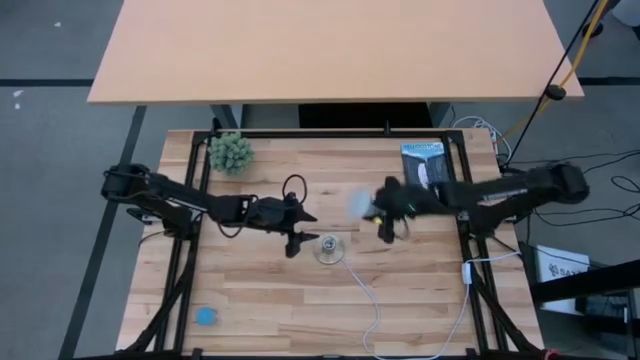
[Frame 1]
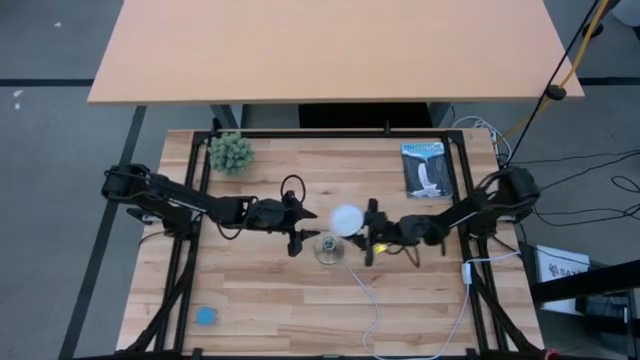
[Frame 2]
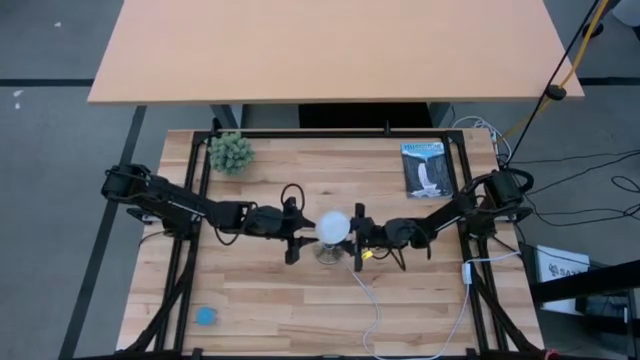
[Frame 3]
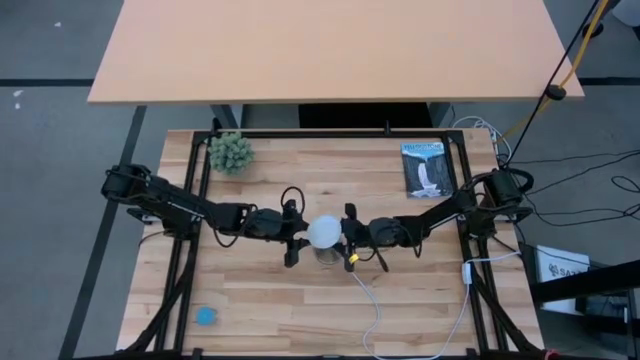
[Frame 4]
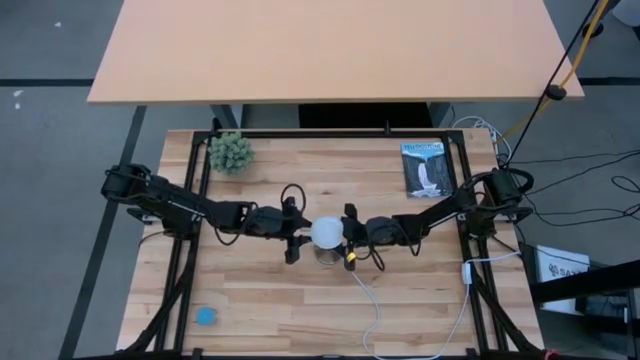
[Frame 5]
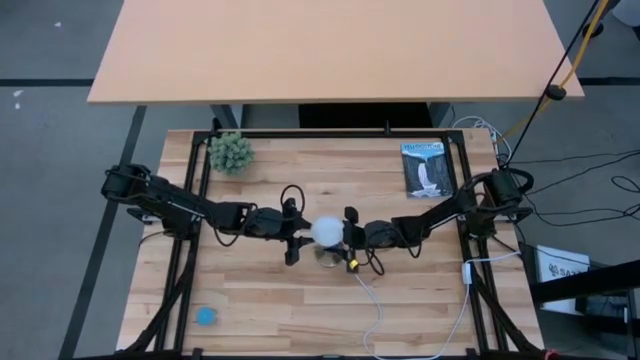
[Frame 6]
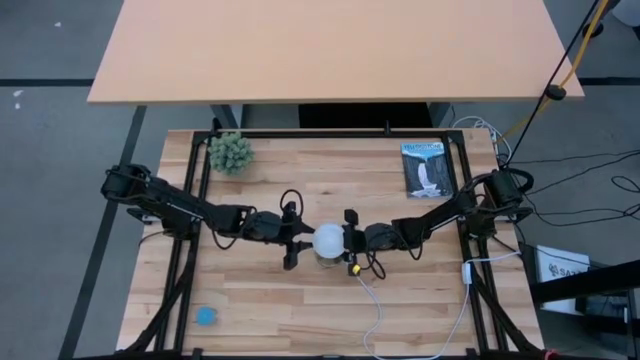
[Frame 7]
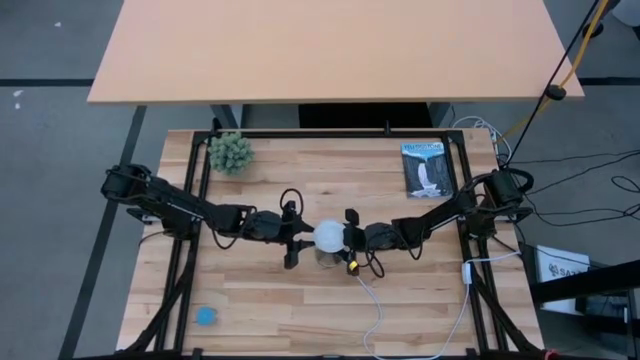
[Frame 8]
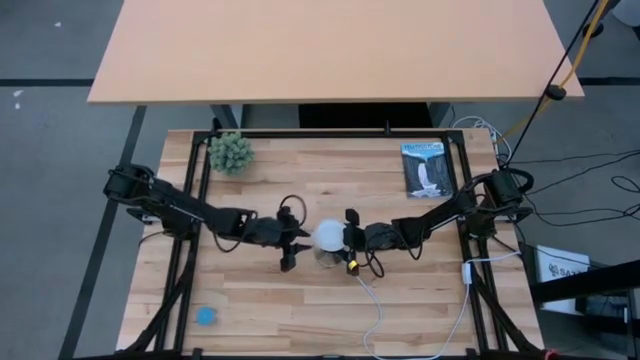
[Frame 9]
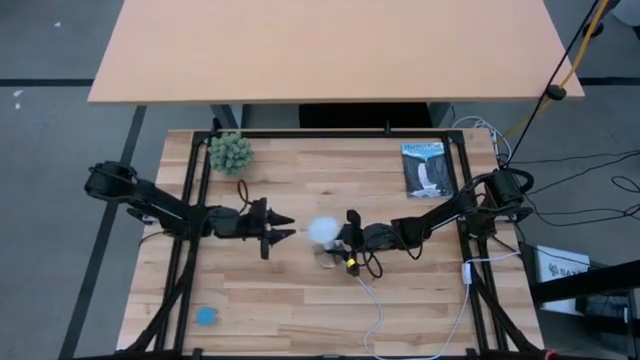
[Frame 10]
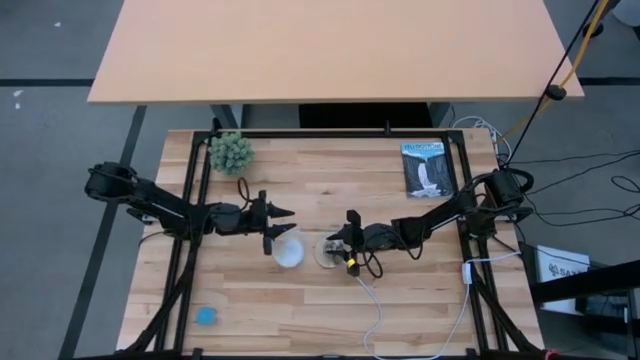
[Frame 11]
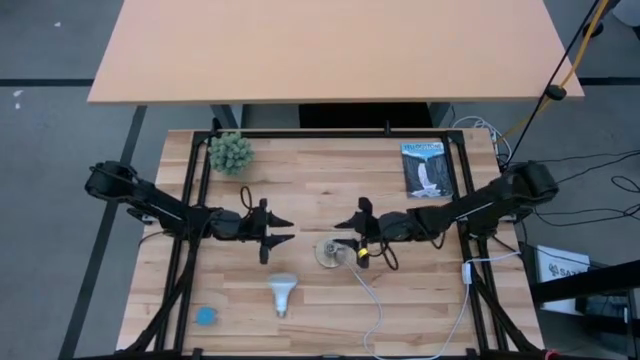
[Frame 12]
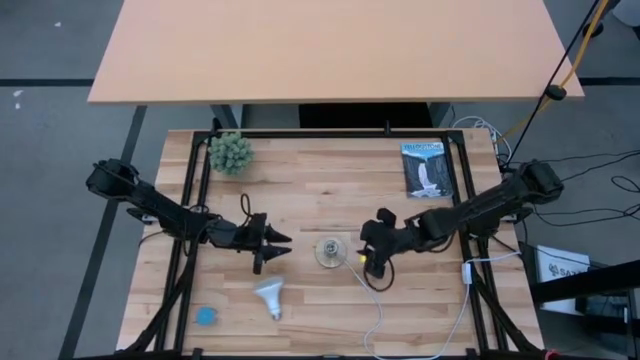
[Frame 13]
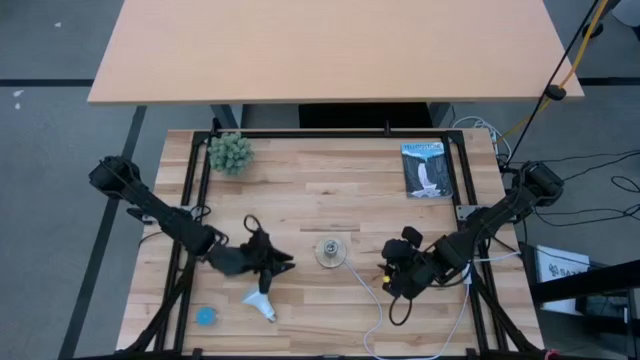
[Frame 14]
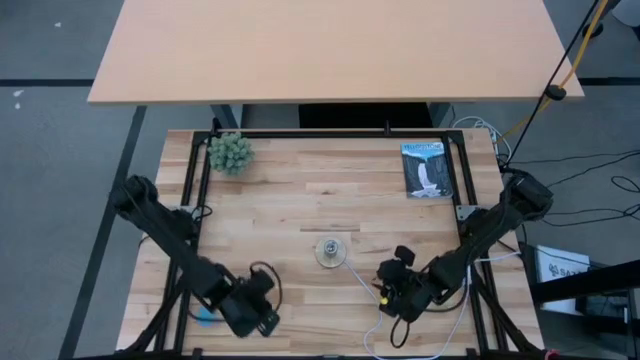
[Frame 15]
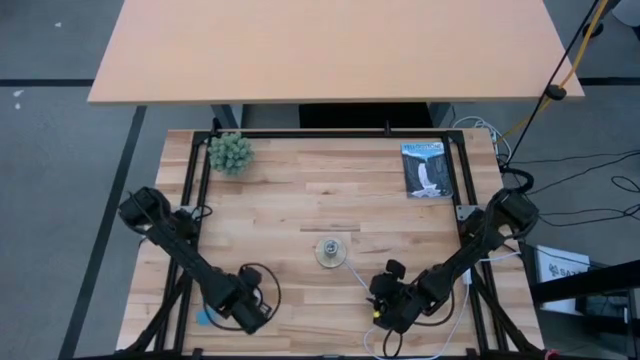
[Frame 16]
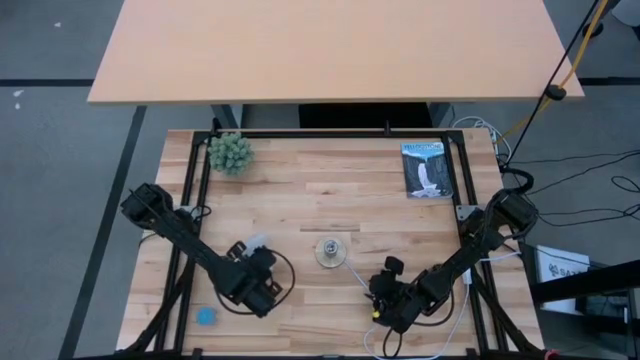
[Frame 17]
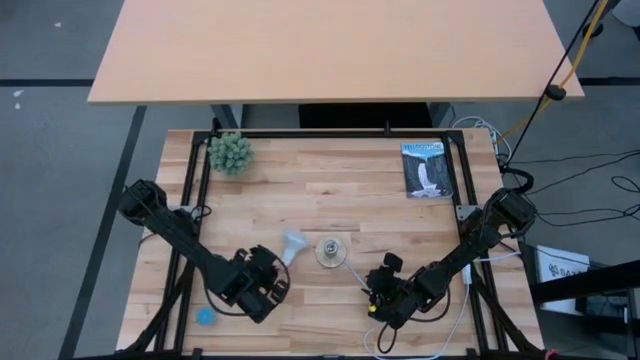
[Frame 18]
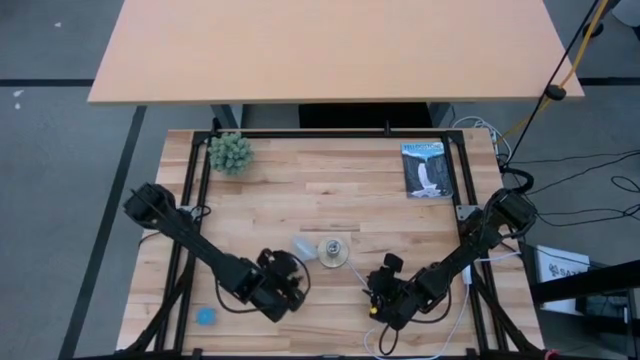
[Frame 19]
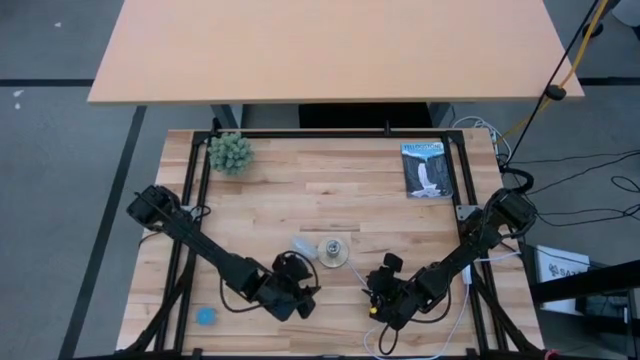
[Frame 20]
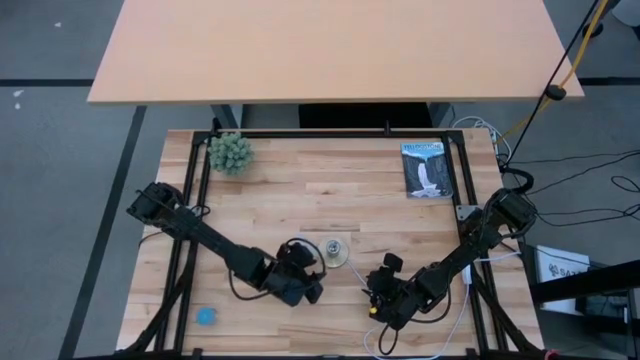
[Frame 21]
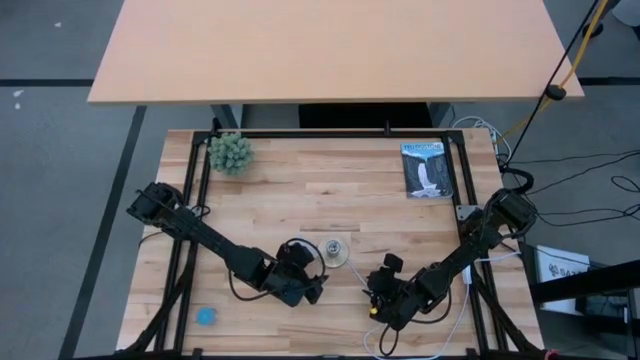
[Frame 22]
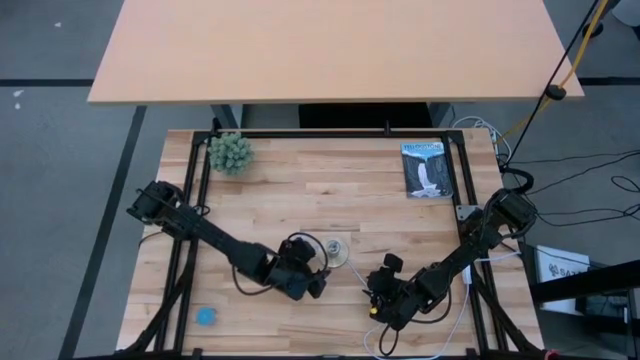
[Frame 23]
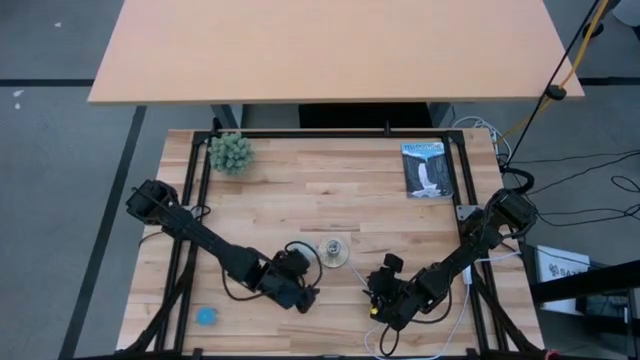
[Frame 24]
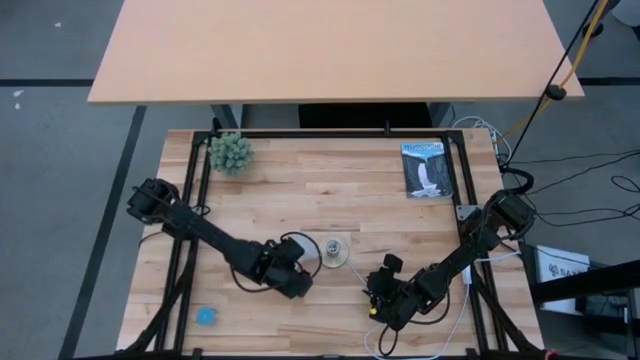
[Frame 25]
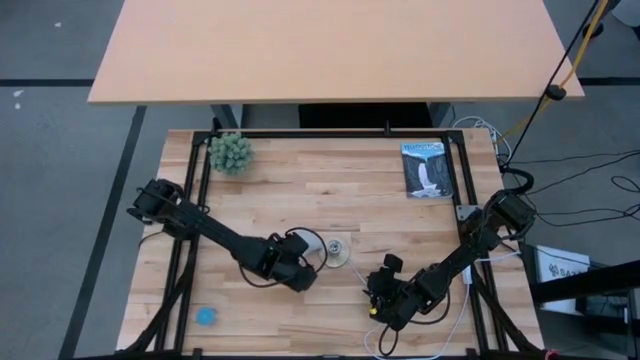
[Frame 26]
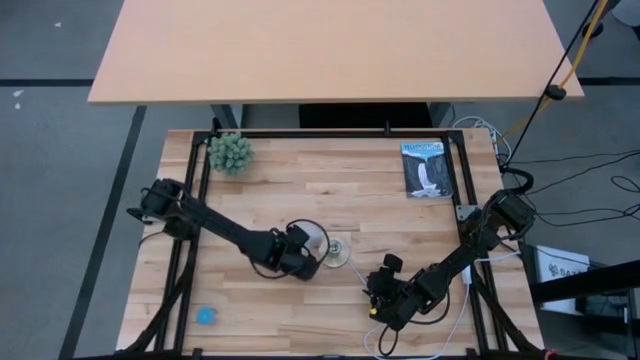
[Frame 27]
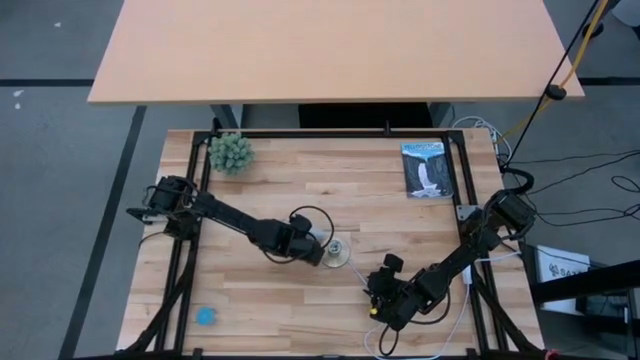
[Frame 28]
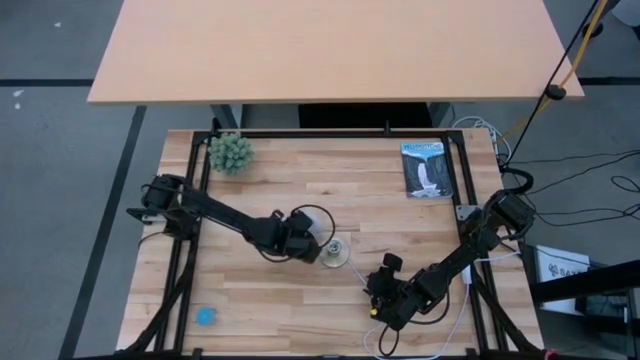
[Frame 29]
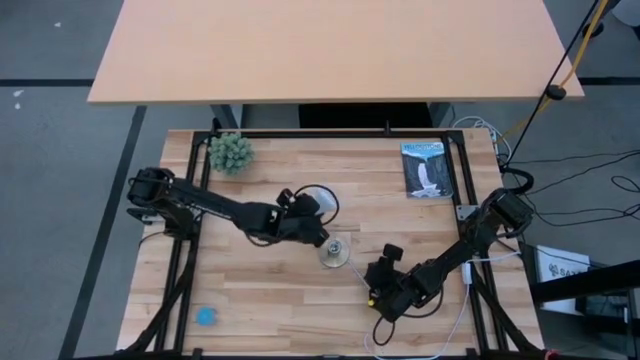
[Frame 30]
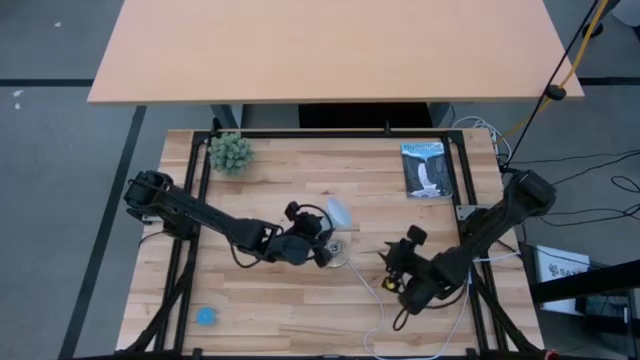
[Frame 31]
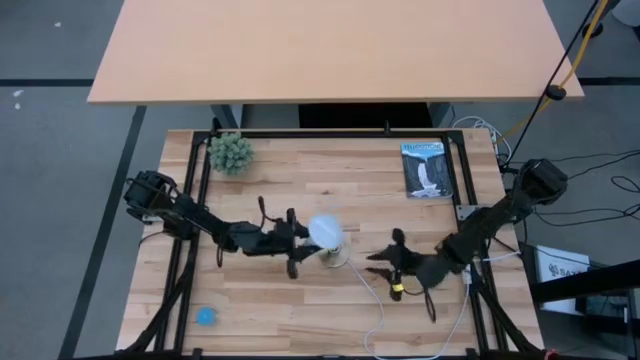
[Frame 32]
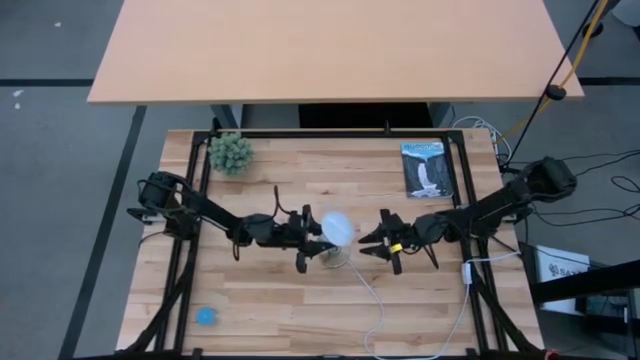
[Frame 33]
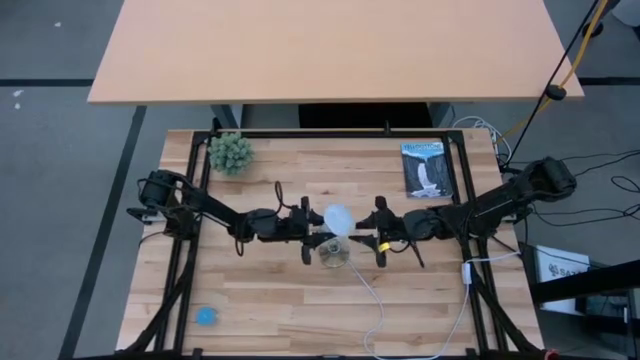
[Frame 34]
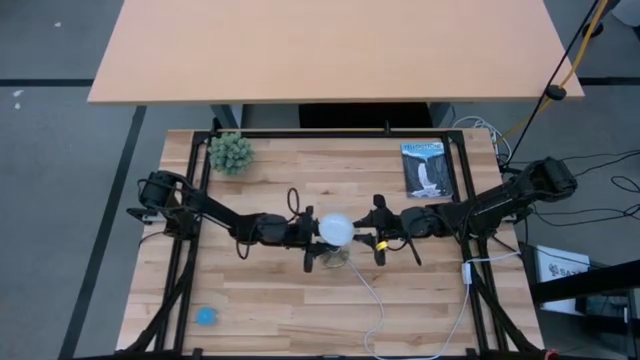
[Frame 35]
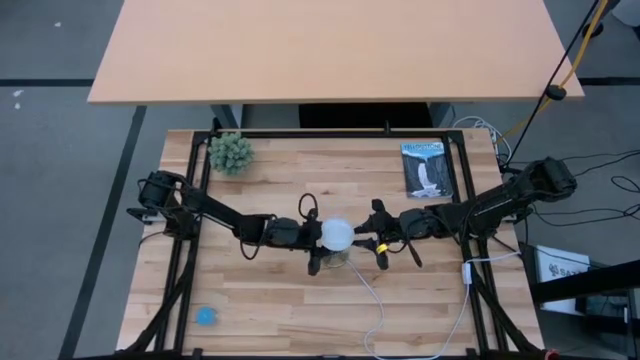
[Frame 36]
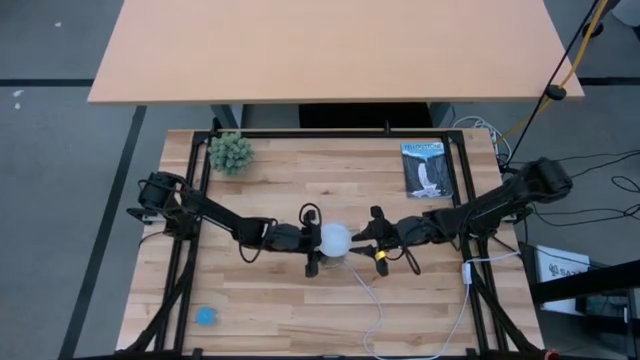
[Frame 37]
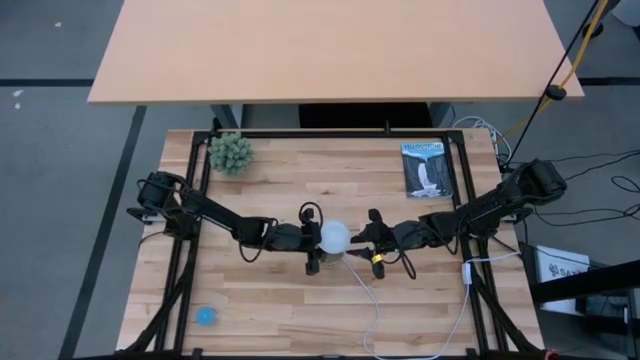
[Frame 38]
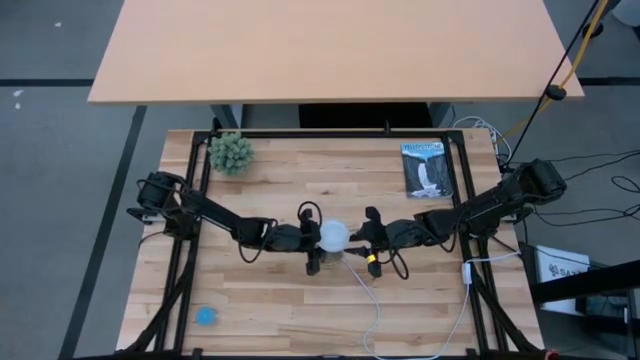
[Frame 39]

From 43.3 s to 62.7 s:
Task: Screw lightbulb
Insert the white lightbulb into the desk lamp
